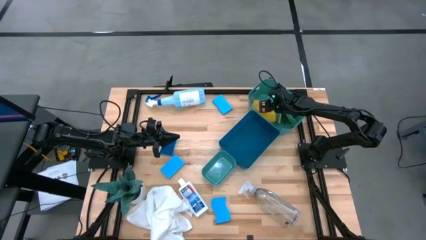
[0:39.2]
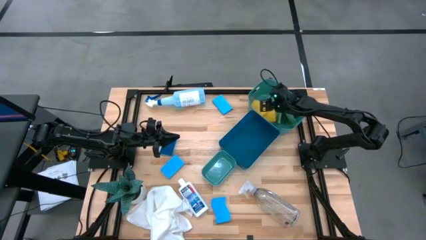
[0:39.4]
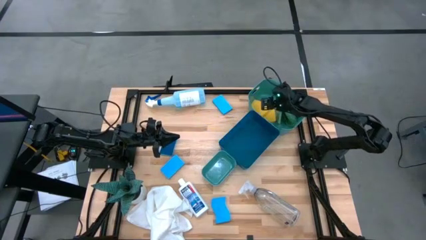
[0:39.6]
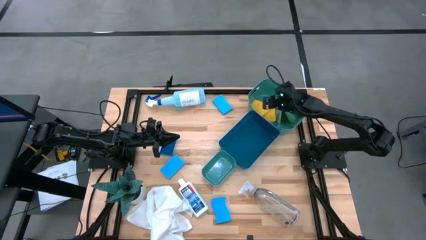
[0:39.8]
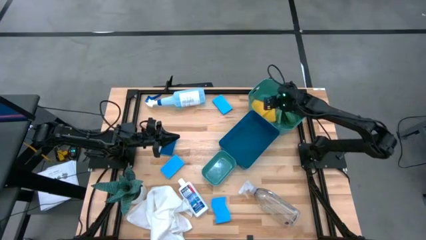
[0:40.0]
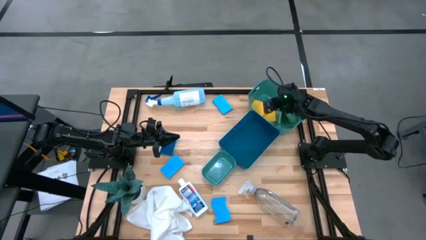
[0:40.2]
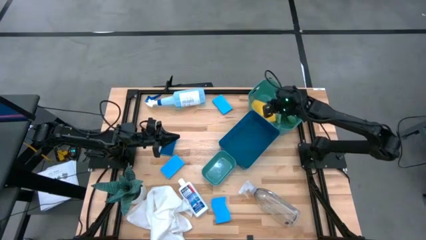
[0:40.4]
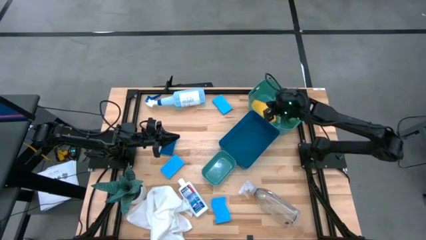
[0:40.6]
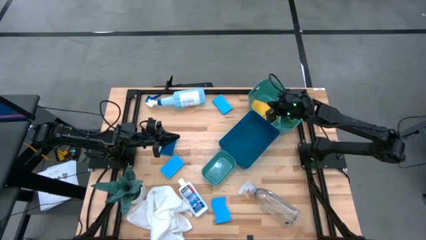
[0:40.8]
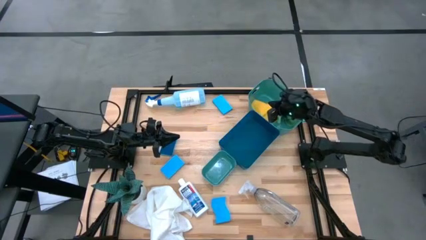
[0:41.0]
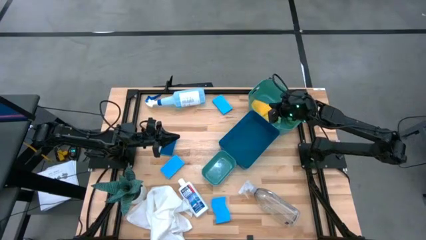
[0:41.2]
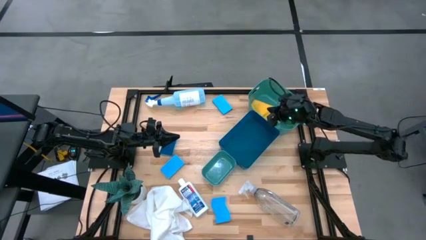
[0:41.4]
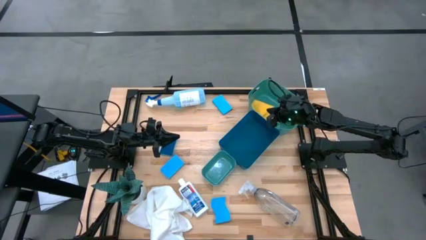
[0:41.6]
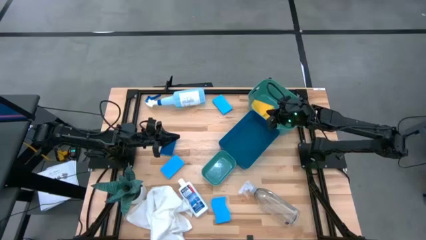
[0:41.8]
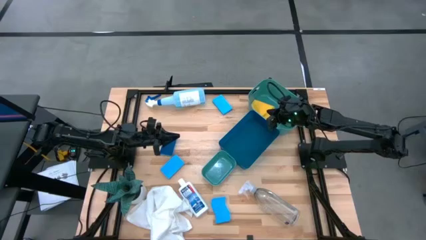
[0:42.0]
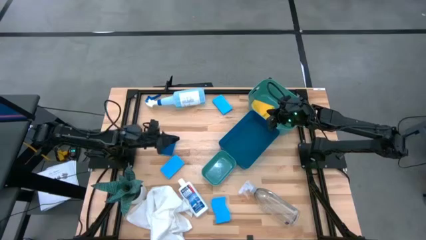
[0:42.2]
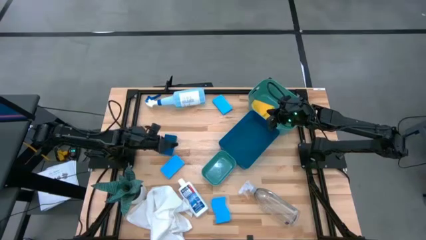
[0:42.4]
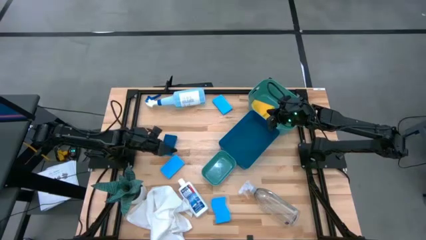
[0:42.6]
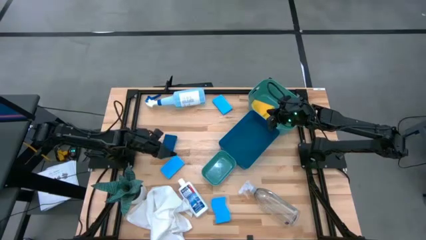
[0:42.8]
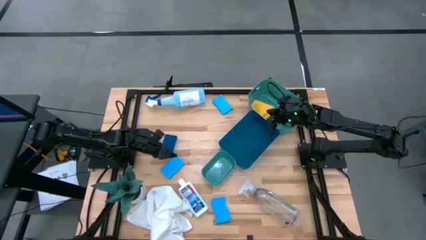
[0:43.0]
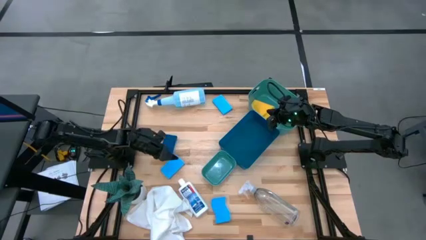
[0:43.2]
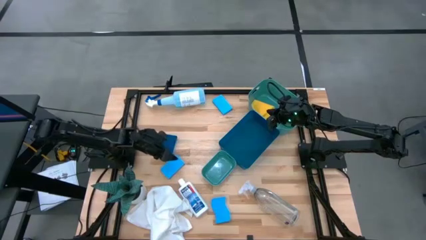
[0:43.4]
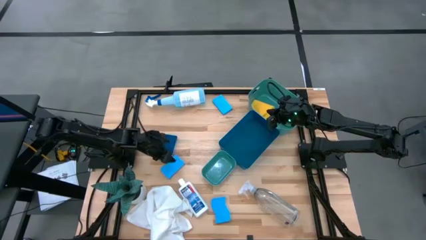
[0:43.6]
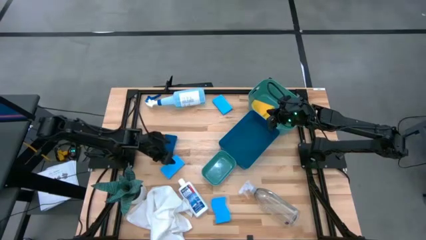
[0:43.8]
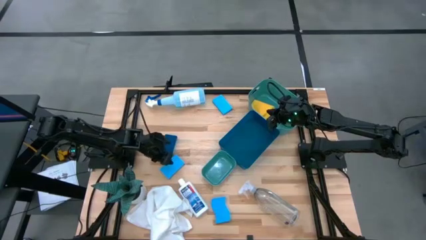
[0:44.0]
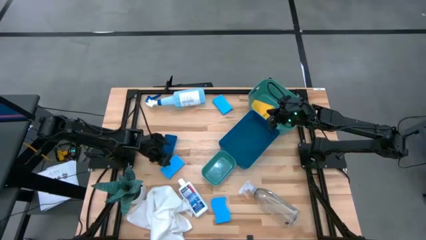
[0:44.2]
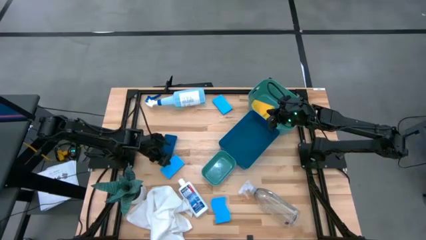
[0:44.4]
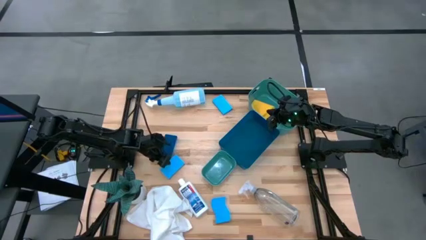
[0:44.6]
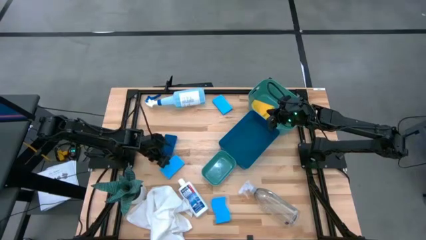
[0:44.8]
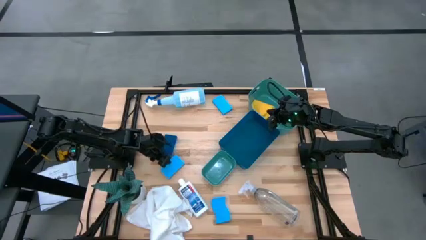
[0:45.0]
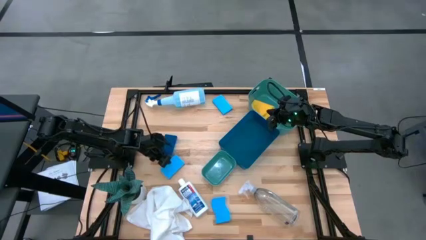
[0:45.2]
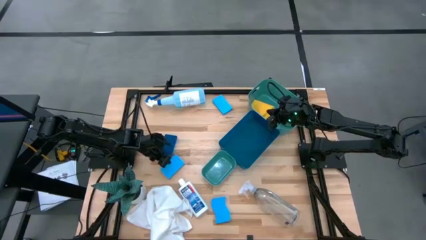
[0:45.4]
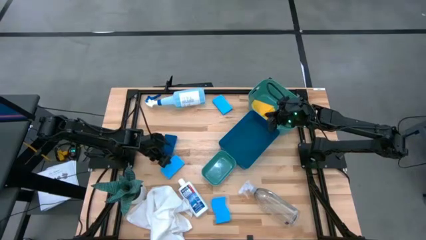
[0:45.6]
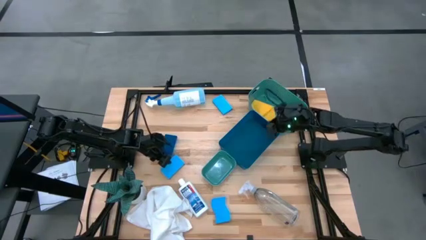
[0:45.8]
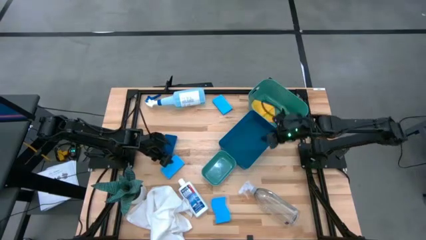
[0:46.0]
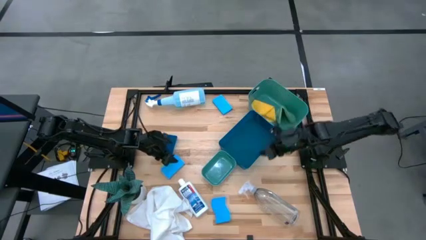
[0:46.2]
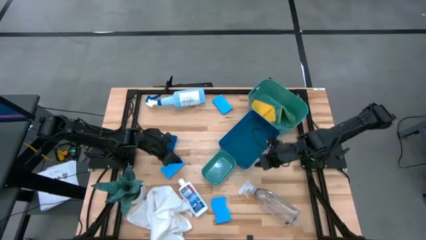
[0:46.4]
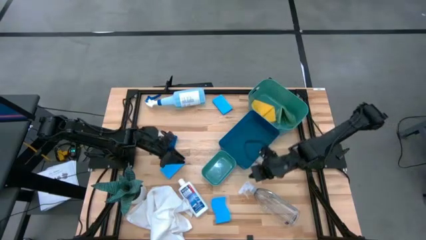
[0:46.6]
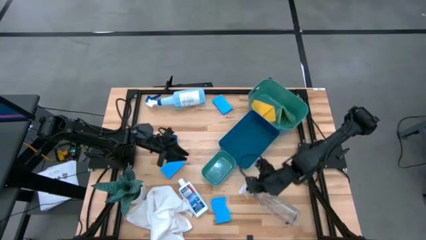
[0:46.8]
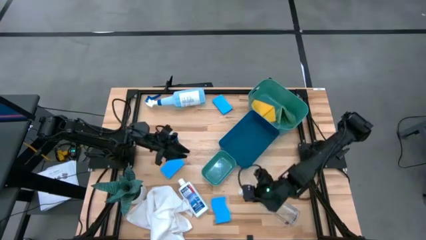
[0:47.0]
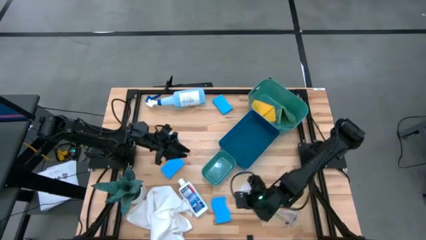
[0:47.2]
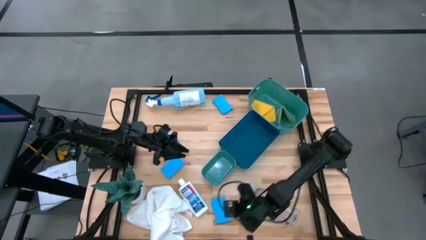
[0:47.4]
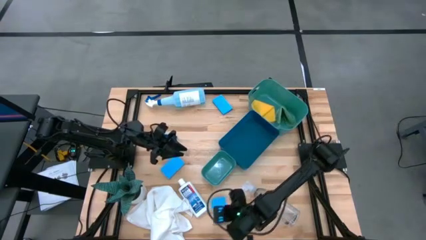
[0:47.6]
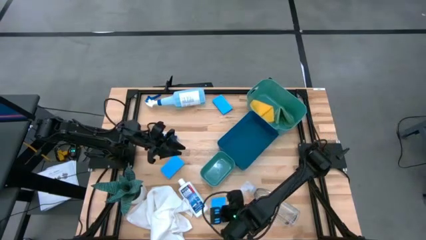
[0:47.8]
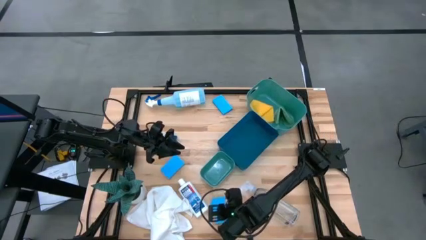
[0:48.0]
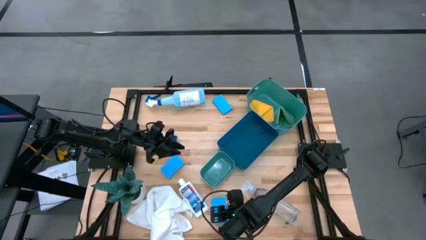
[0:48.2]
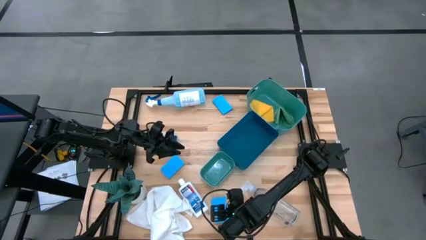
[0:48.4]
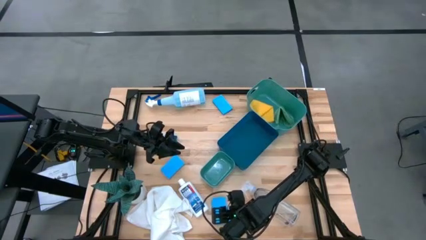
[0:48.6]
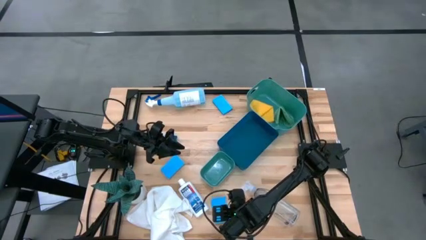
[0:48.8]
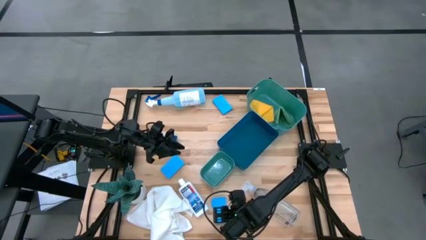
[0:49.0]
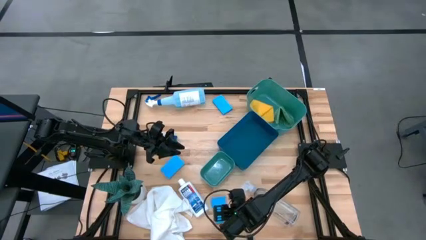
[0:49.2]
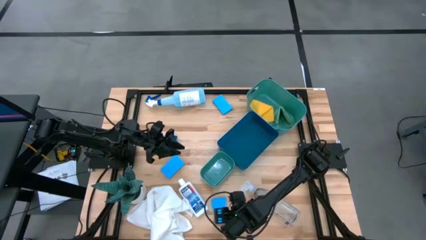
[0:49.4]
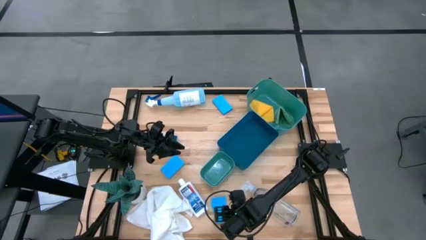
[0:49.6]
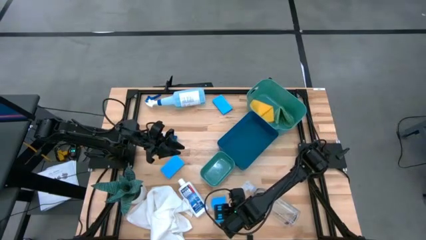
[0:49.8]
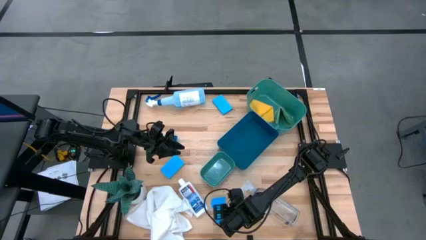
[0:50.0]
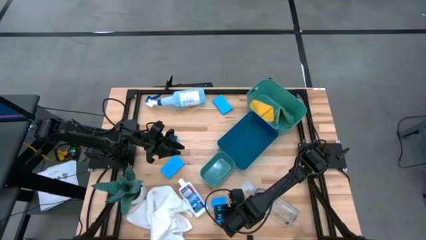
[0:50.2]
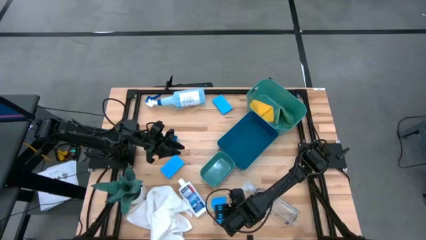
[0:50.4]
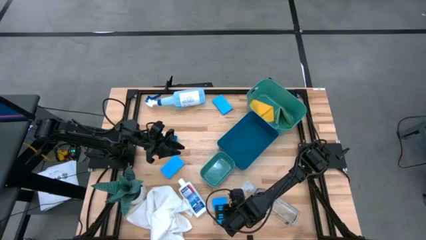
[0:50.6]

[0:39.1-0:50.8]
Task: Pick & Place Kitchen Items
Put the bottom right light blue sponge into the bottom green bin

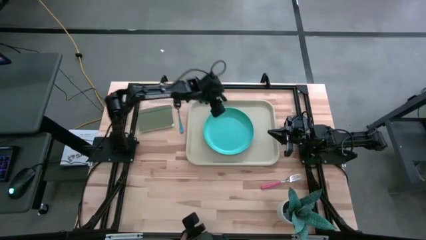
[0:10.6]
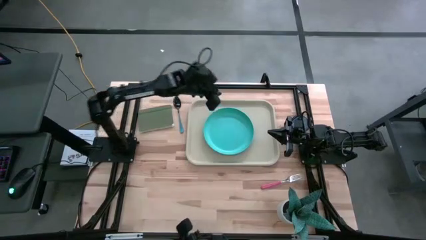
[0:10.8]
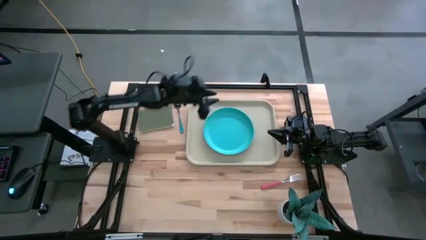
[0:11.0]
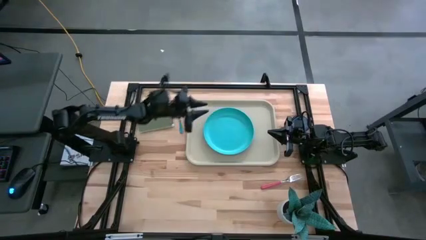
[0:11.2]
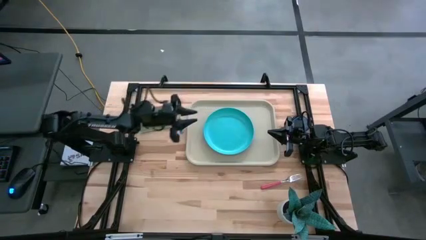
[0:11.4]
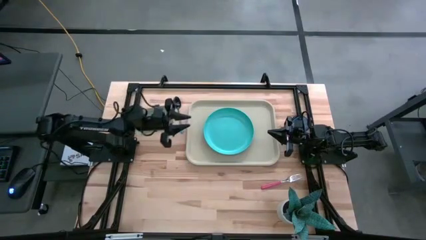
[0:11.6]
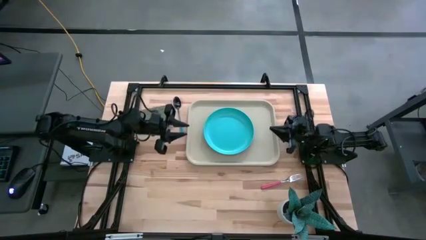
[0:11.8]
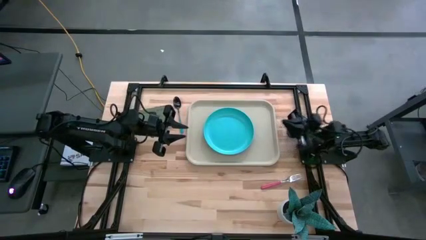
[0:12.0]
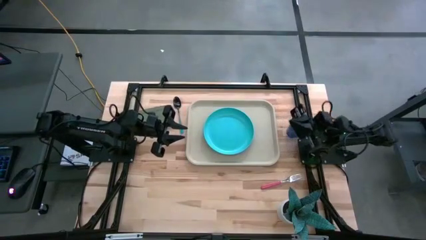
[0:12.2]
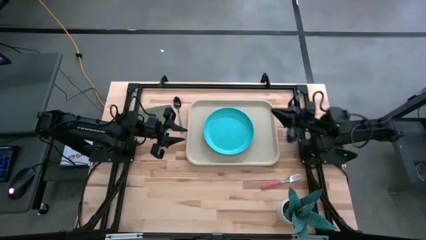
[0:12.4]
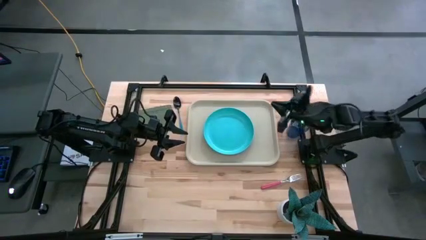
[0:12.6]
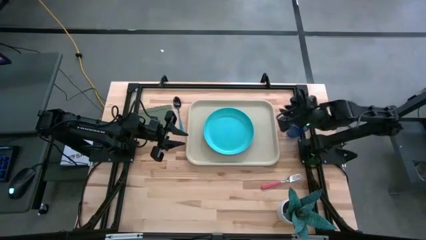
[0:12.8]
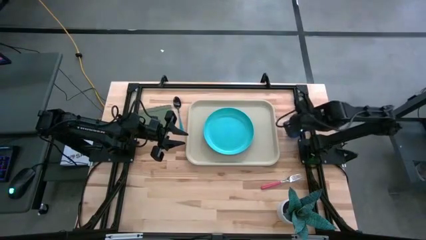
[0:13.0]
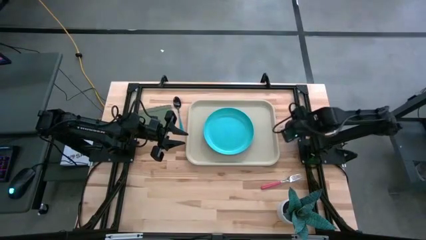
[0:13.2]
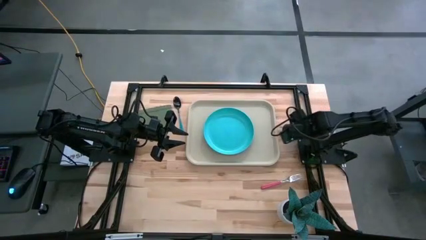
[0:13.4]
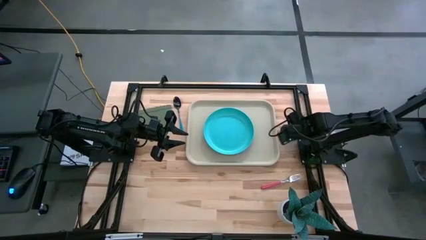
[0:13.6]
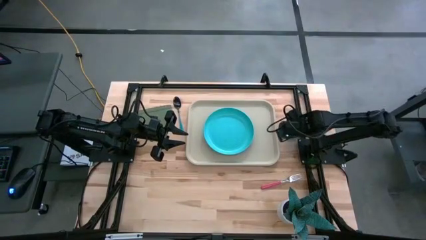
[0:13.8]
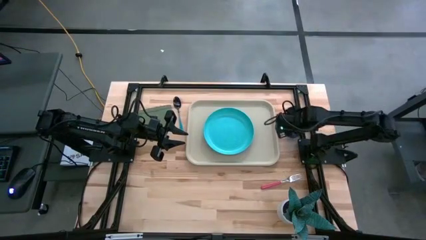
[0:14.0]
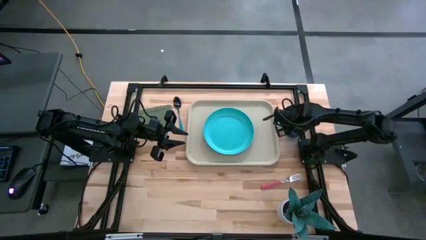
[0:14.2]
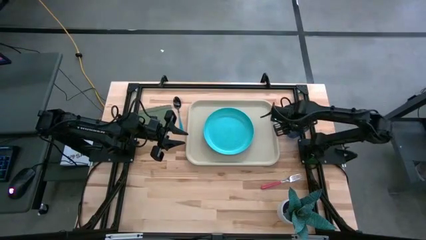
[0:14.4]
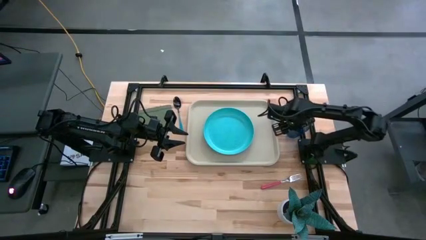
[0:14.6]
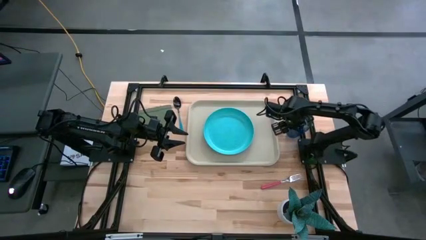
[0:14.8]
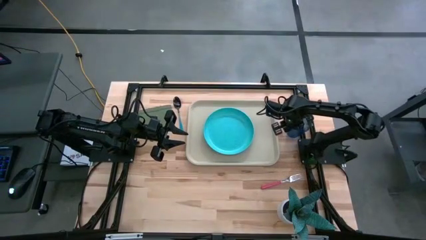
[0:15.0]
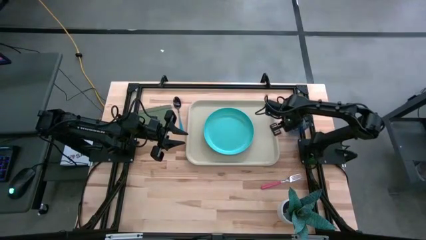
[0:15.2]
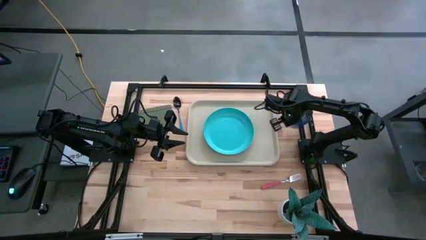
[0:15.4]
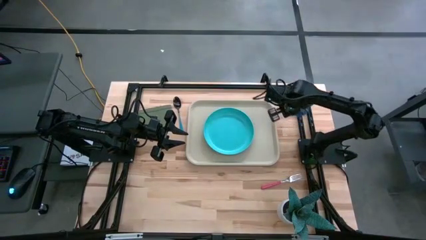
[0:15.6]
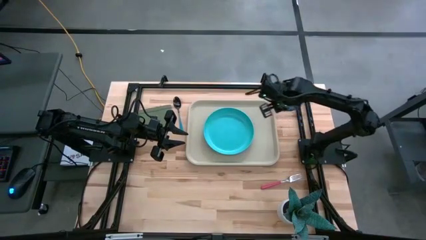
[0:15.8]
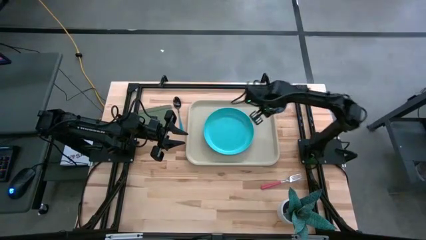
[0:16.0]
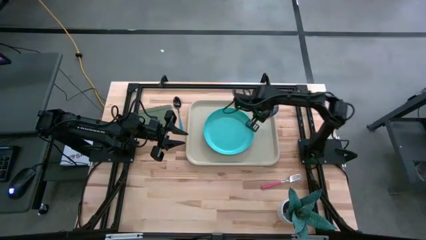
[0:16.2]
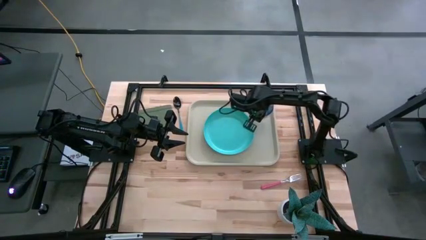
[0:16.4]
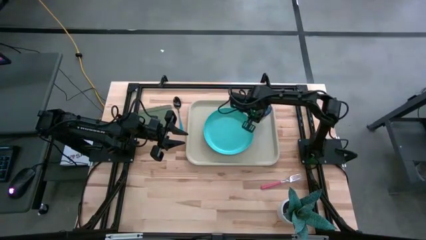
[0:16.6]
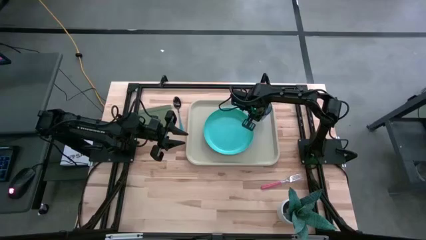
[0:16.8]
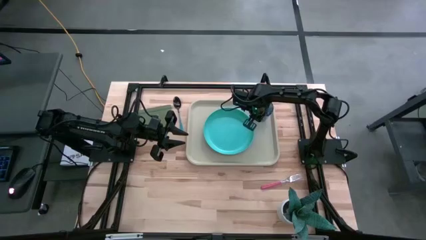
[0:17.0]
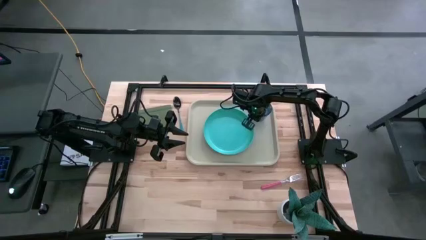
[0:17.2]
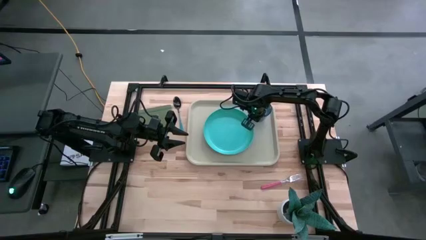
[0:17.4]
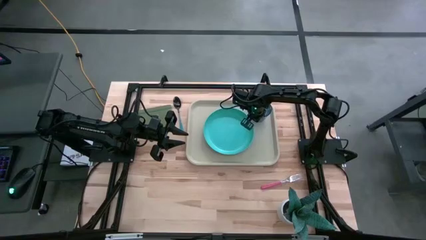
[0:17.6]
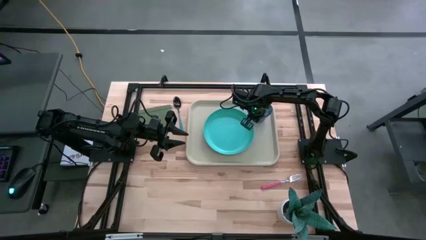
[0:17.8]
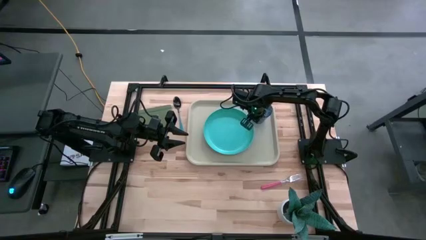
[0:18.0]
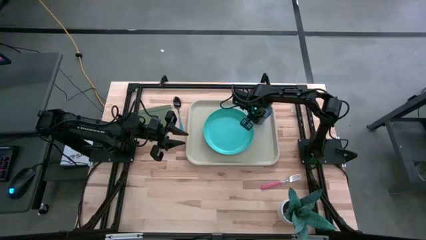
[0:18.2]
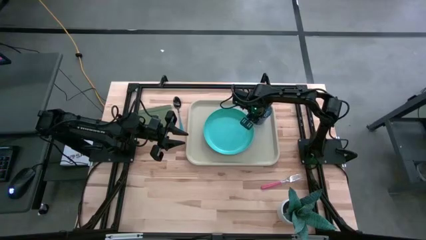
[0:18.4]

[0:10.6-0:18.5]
Task: Pick and place plate/cup/fork/spoon on tray
Put the blue cup on the gray tray above the blue plate
